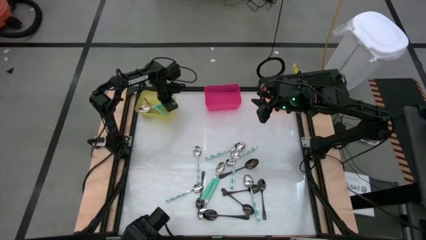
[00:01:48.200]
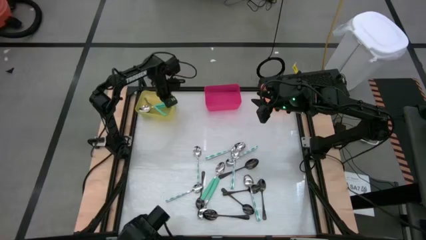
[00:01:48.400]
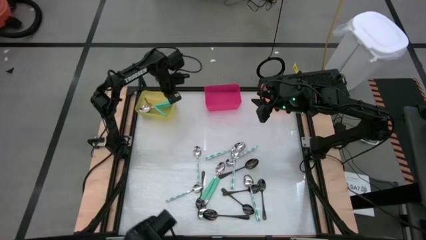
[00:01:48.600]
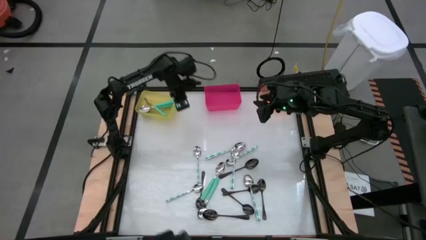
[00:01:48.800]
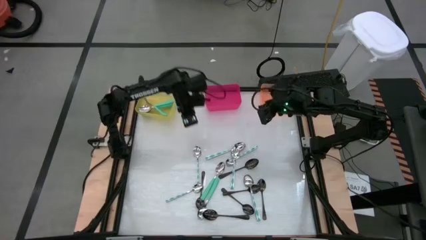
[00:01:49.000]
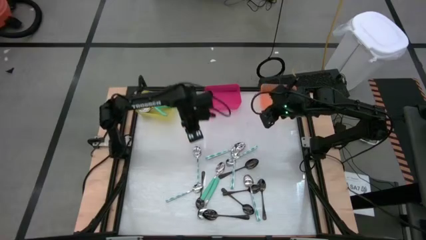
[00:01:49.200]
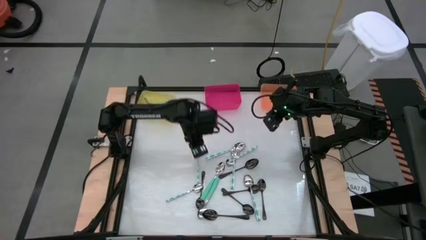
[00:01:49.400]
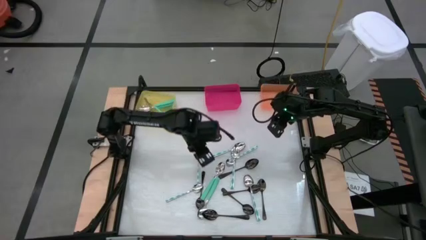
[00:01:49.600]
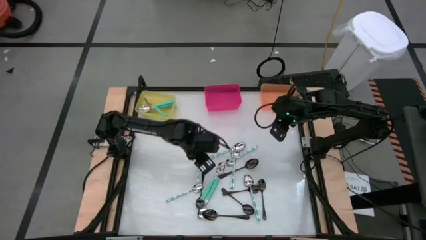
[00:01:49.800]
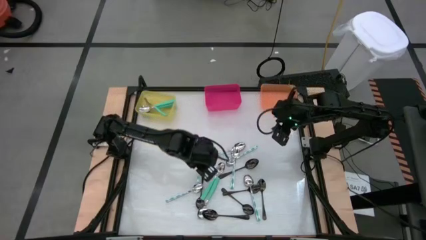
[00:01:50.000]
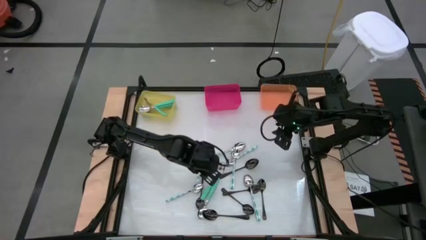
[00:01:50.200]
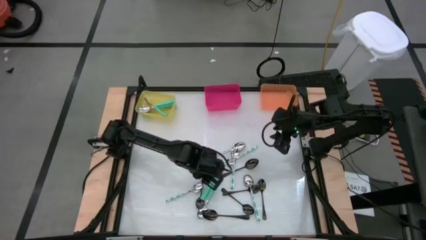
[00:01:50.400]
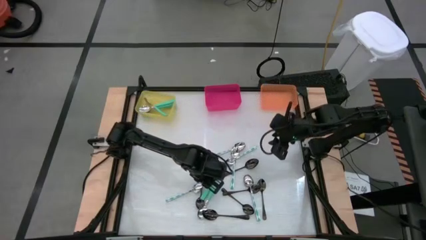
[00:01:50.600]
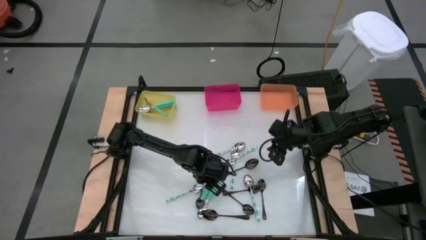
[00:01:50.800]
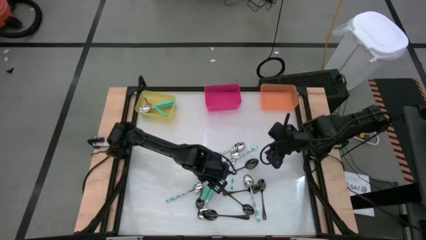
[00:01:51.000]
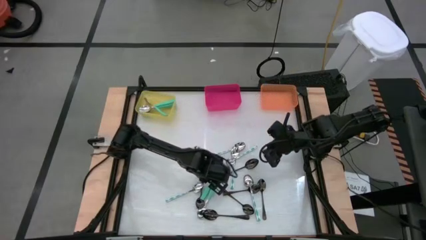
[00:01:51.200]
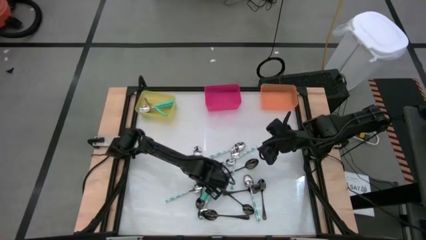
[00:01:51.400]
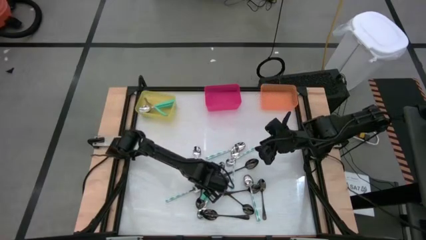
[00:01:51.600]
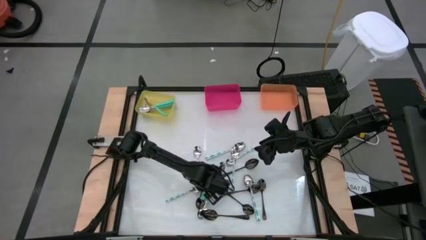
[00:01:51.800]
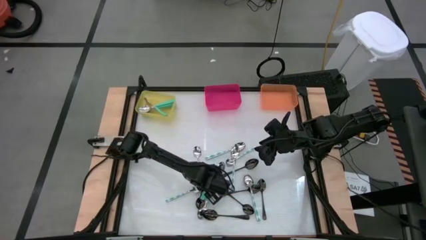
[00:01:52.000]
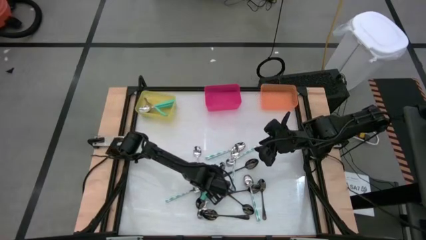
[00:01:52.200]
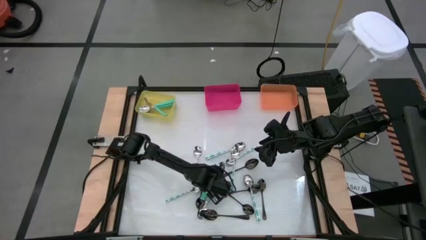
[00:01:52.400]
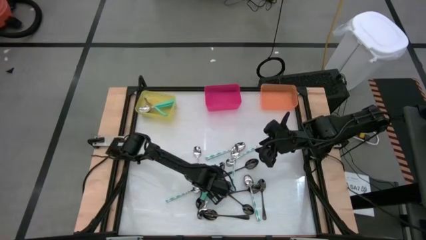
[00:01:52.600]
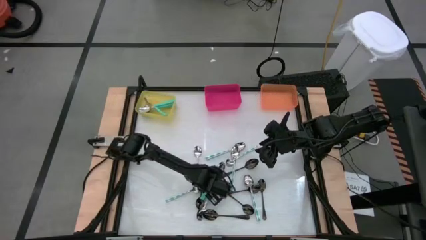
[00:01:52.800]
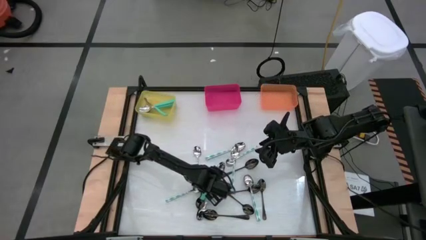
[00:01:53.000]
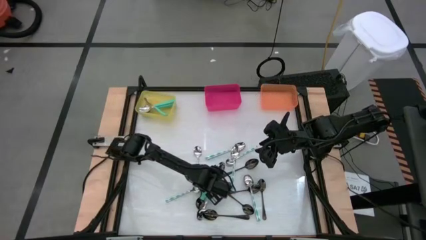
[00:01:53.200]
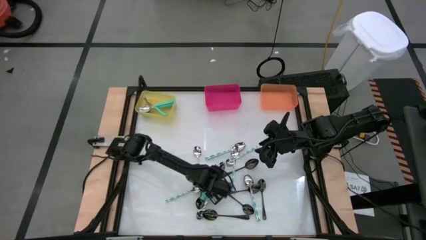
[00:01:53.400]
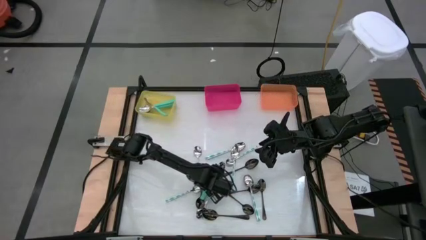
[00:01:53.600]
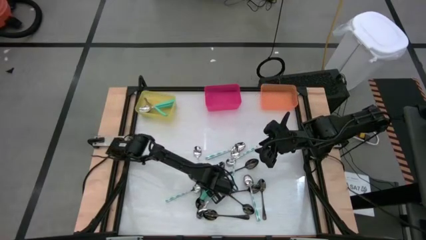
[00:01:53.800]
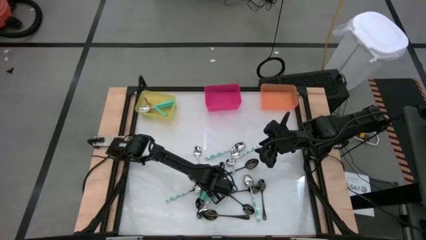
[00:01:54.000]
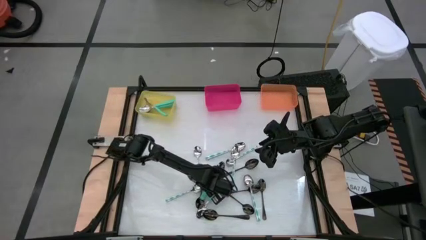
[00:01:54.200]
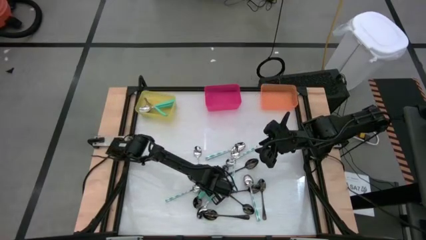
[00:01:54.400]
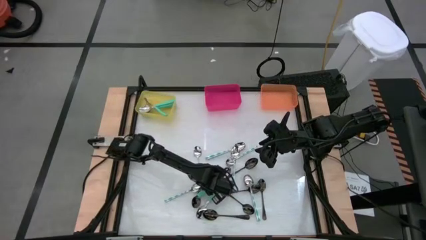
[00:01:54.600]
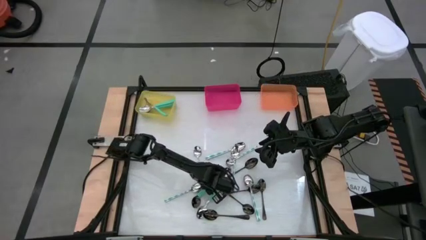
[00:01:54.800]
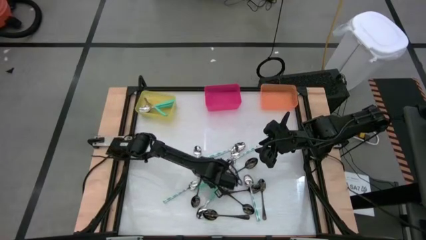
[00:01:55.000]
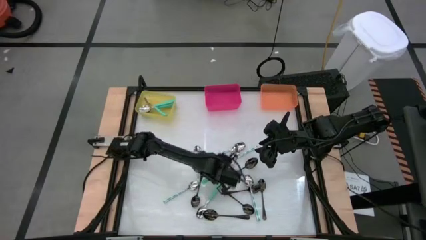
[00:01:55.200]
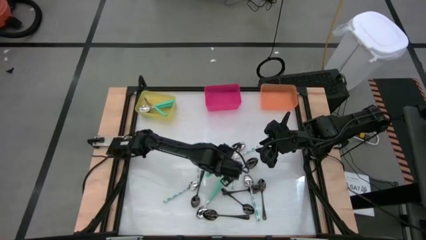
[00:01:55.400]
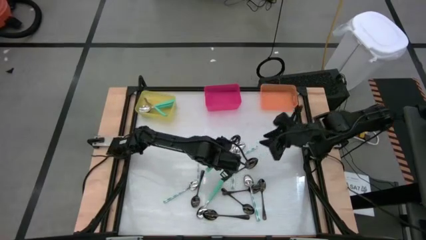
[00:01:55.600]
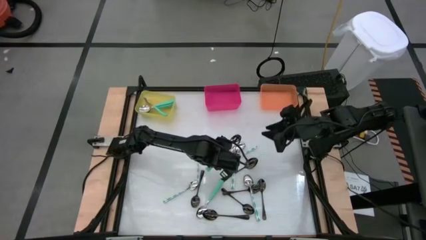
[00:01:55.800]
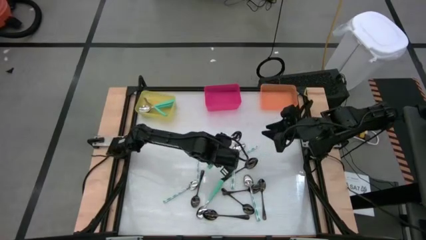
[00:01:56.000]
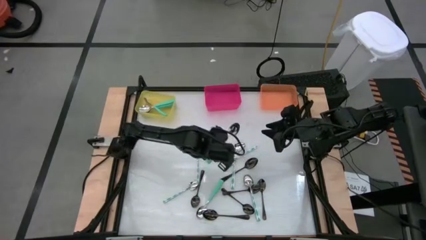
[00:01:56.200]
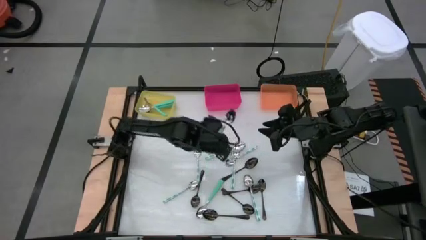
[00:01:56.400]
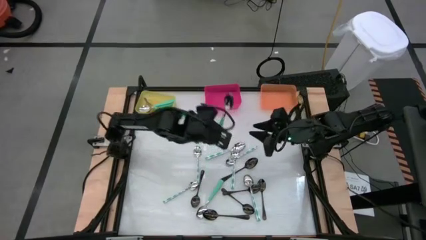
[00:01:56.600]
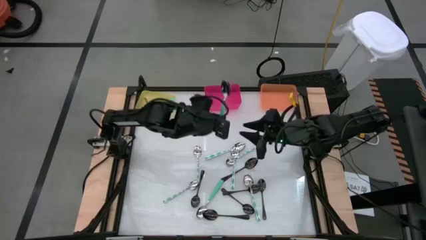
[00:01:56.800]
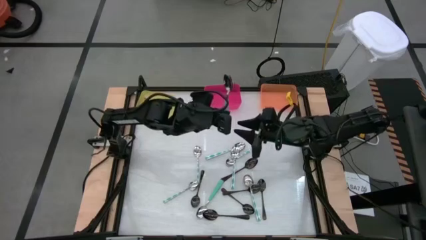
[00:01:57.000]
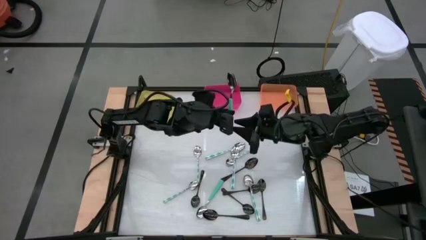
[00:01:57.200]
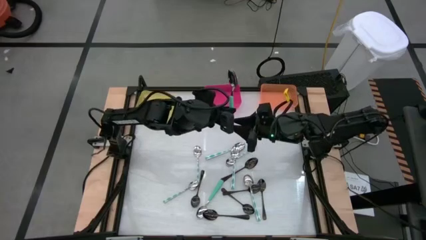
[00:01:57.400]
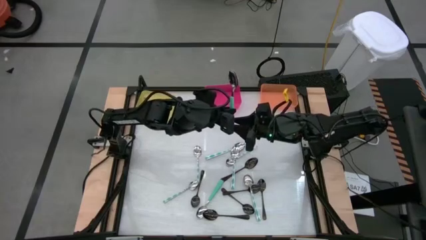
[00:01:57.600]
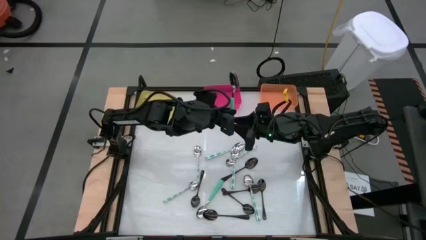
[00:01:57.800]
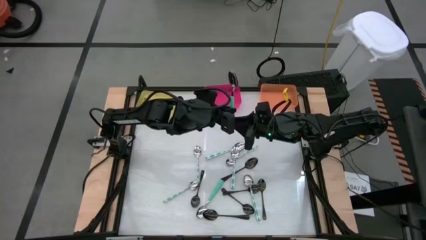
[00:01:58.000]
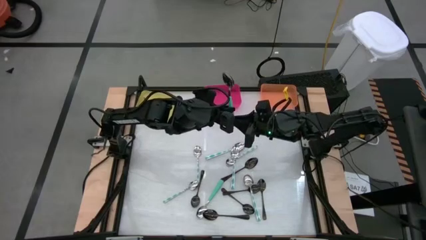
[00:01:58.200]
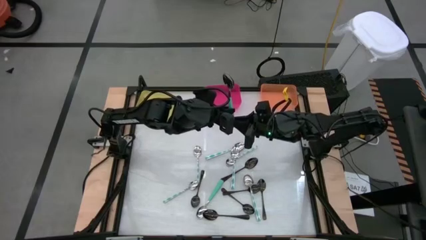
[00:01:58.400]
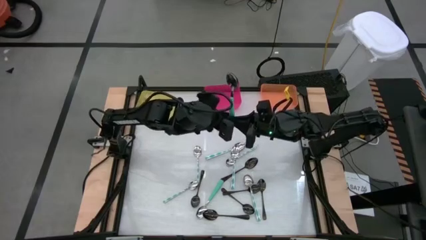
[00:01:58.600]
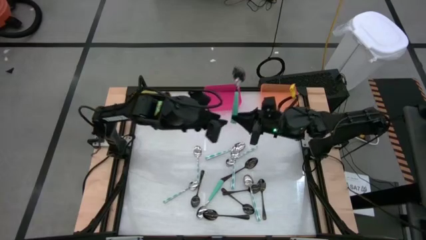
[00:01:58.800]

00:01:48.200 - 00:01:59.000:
Task: Sort silverware by color (type)
Put the light green spoon into the yellow bin
